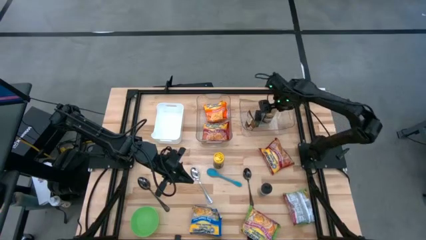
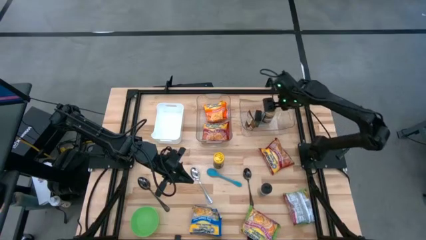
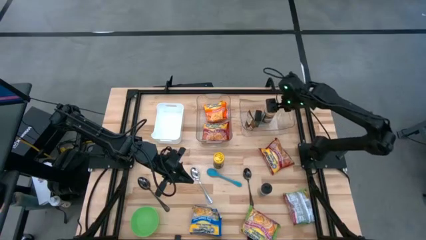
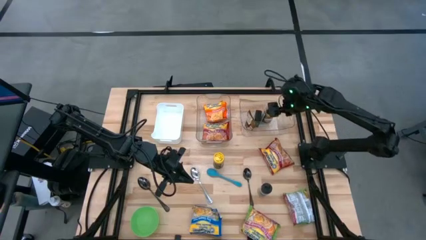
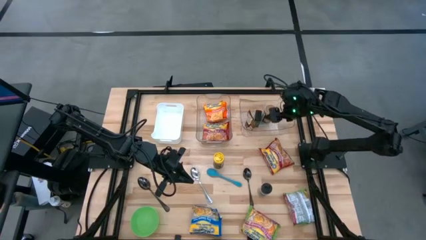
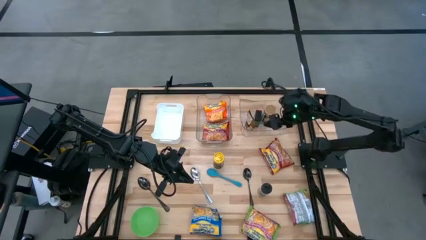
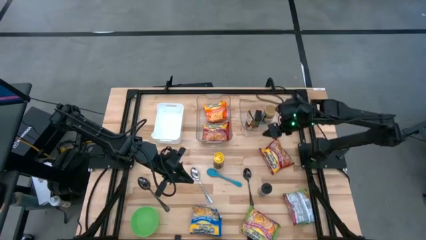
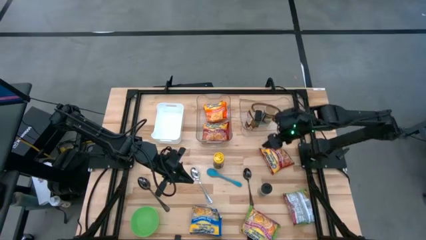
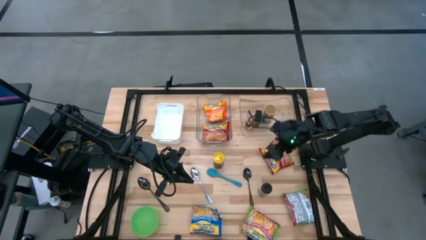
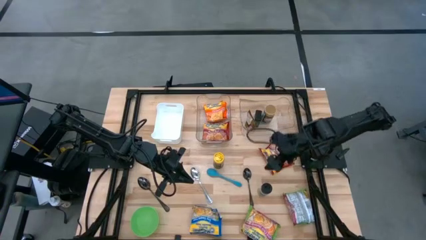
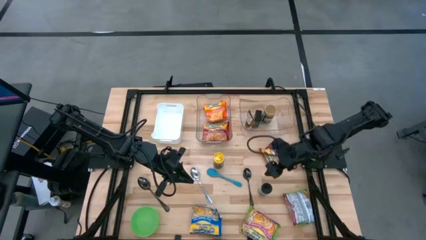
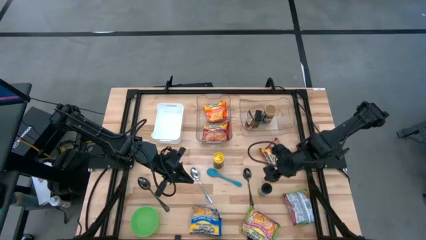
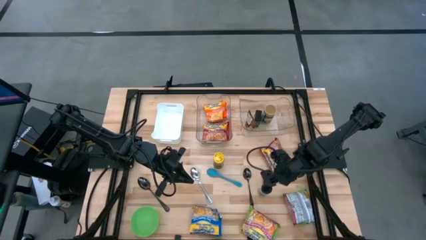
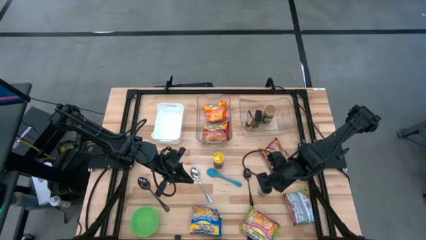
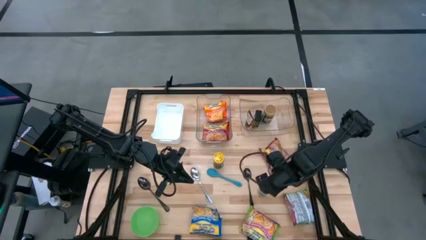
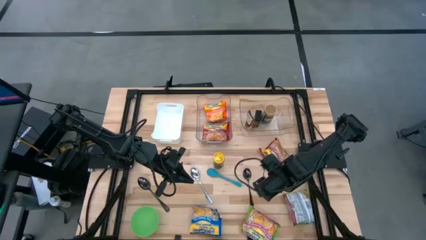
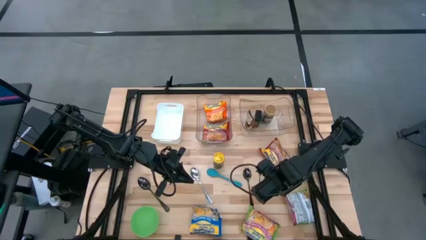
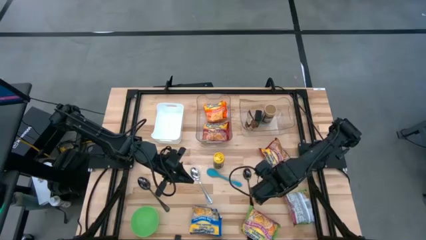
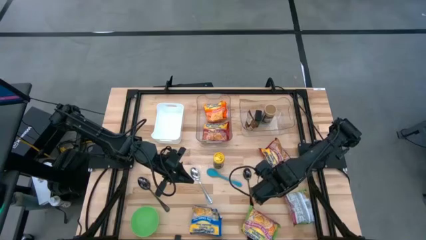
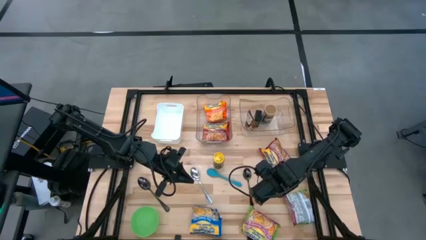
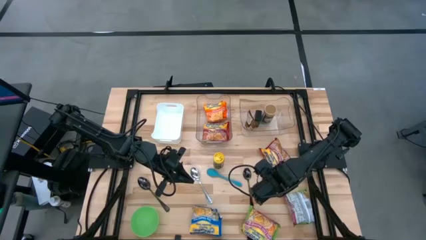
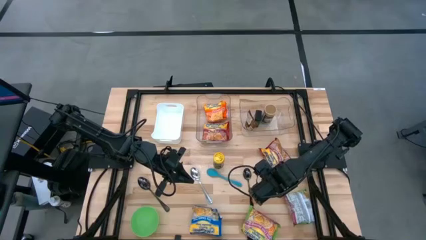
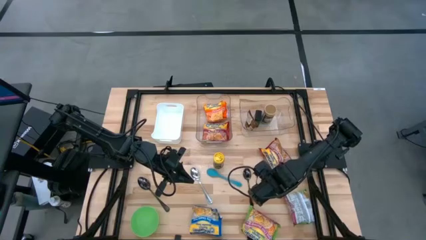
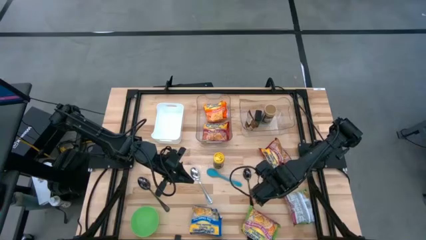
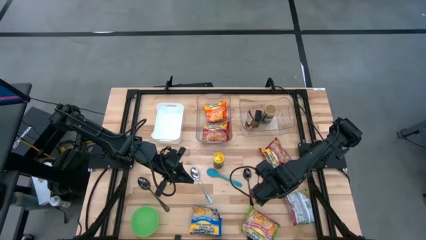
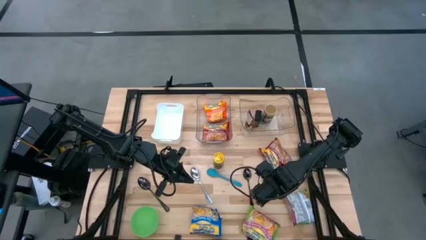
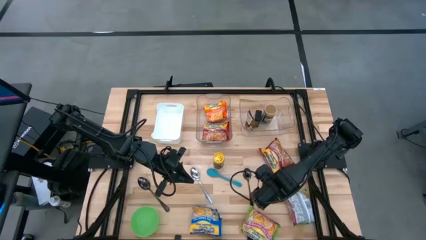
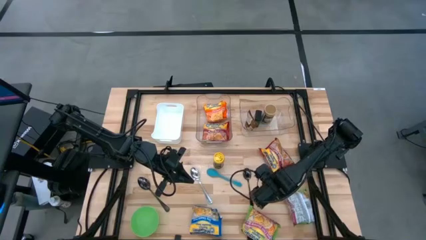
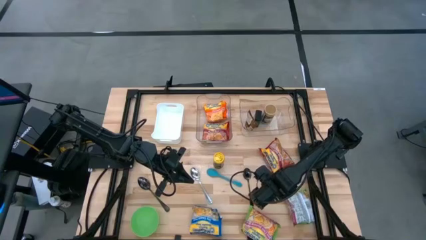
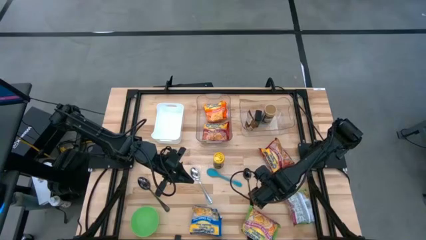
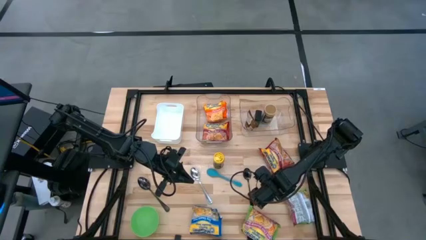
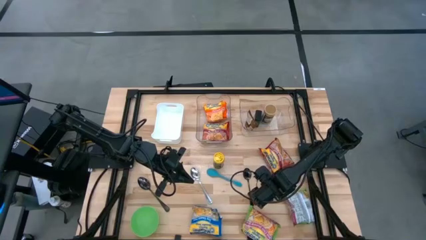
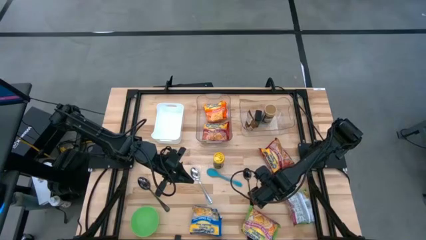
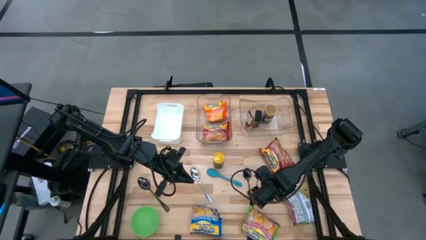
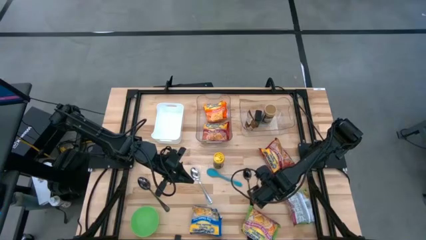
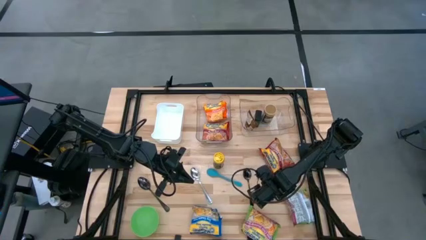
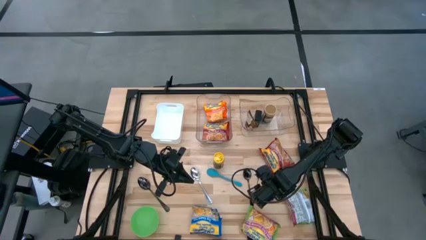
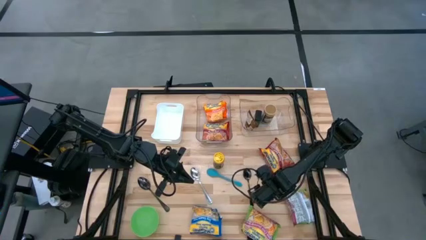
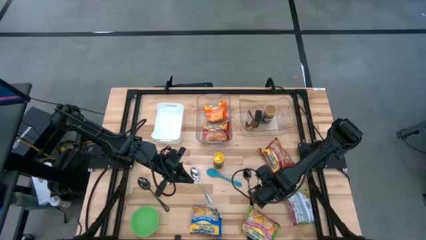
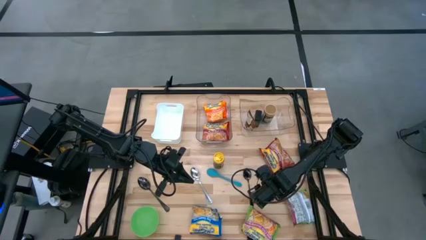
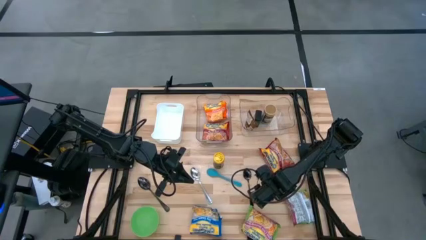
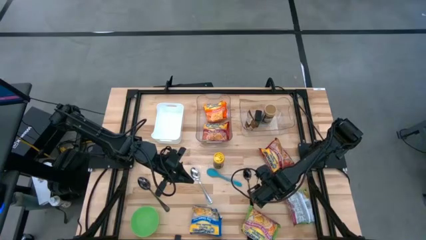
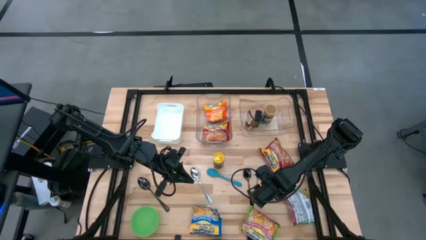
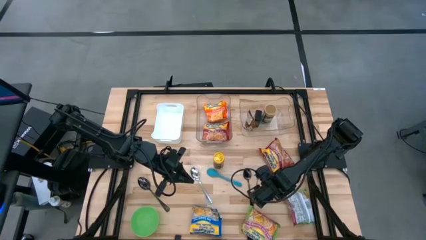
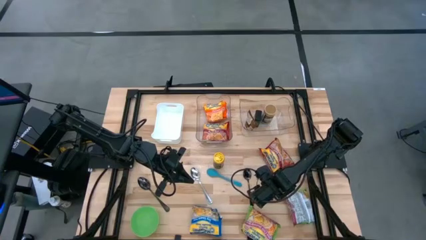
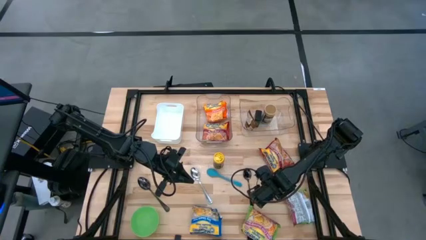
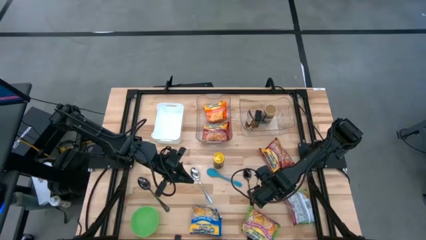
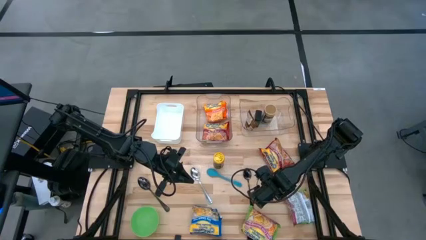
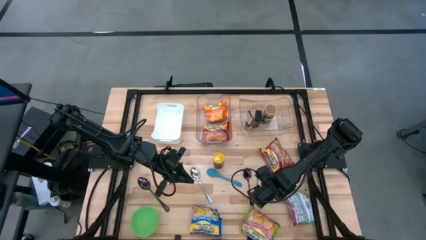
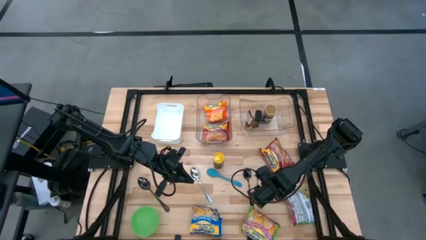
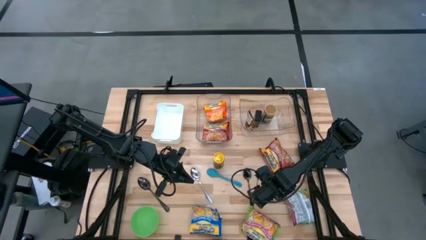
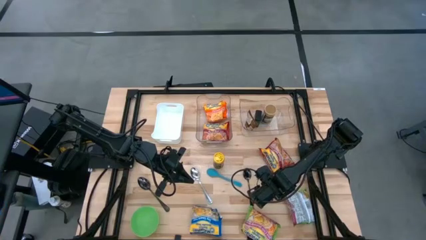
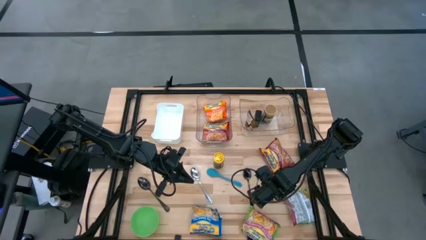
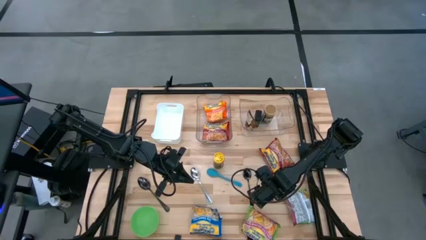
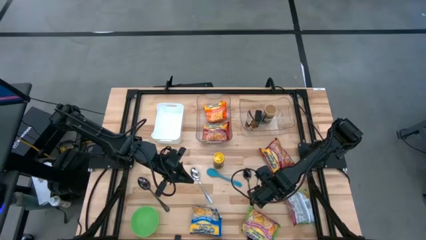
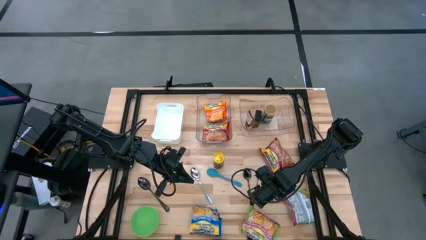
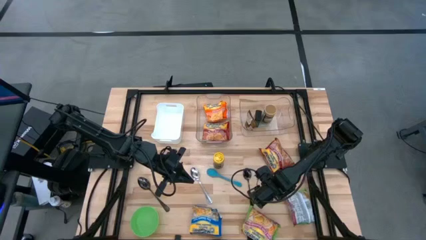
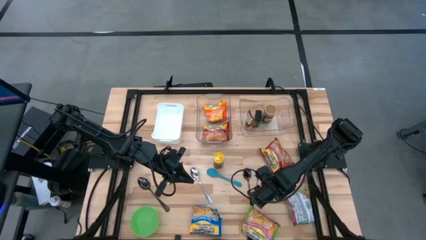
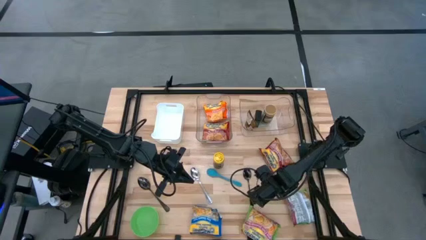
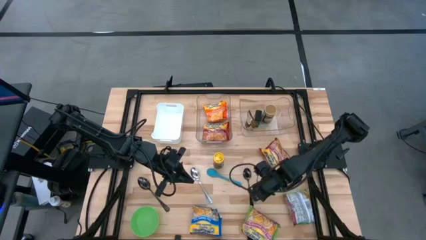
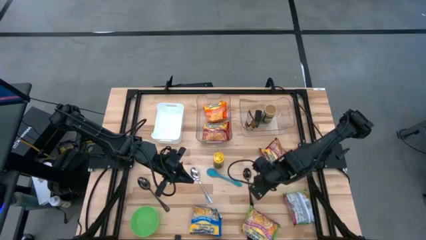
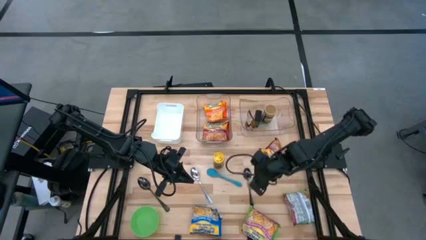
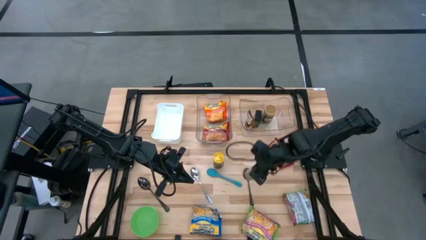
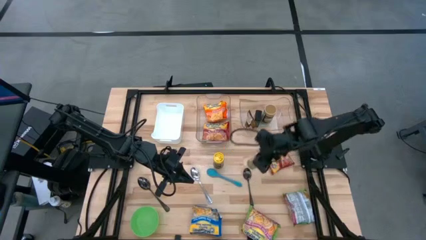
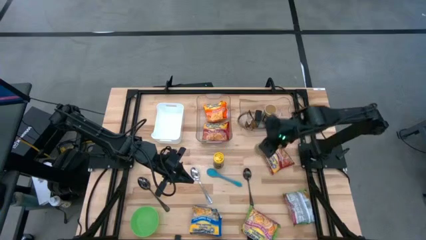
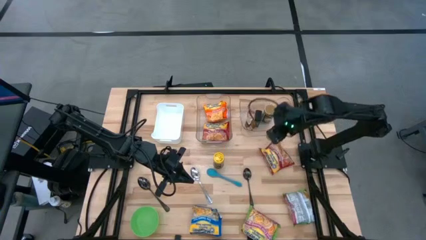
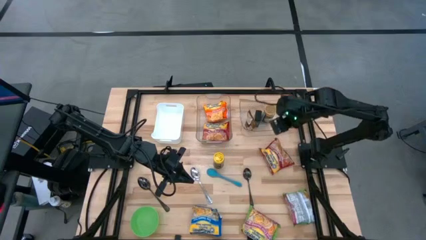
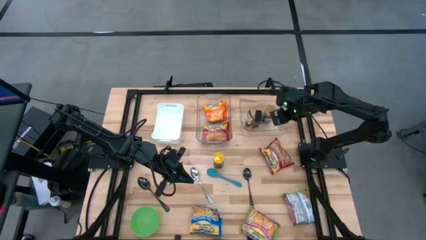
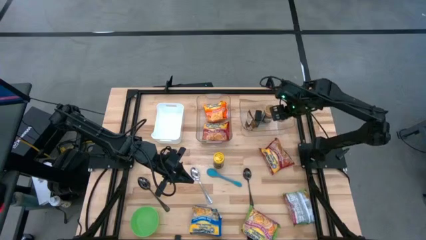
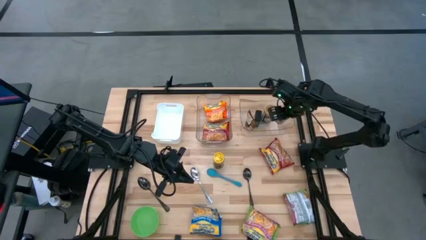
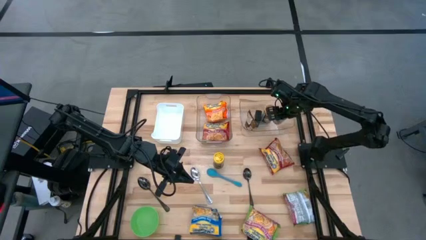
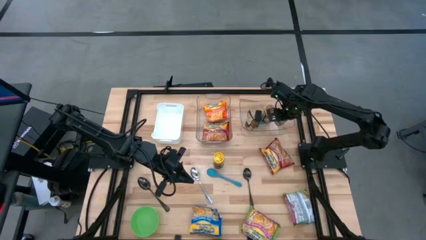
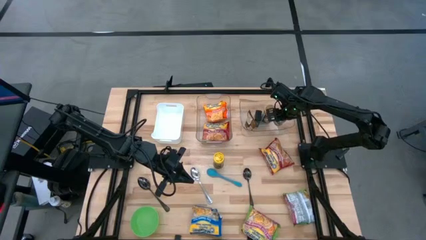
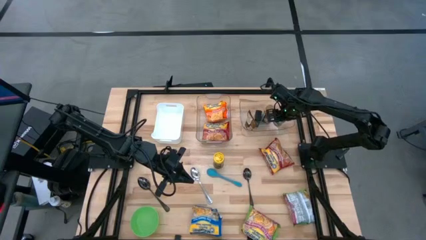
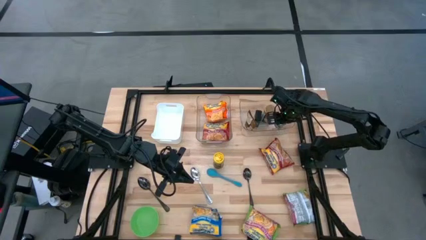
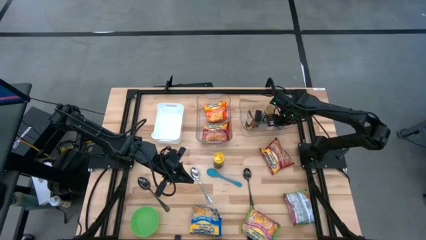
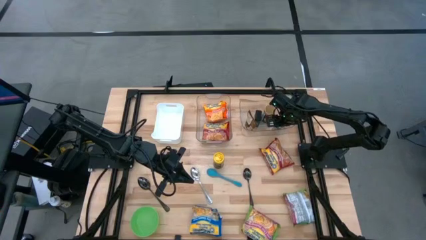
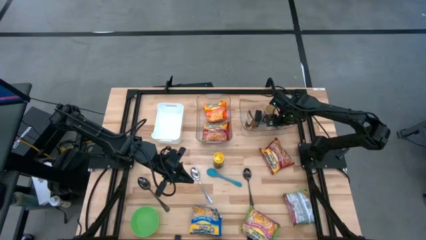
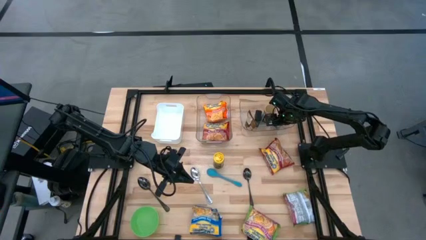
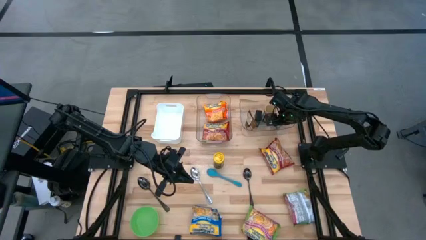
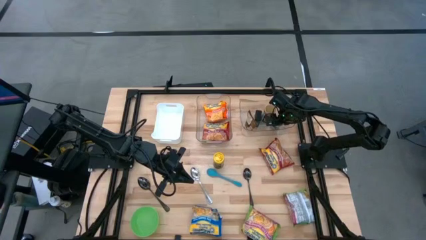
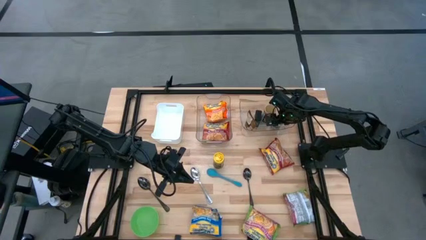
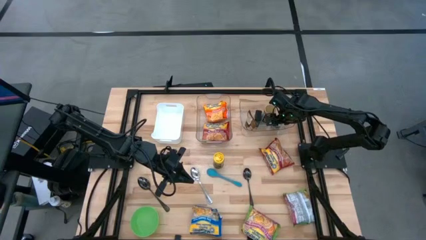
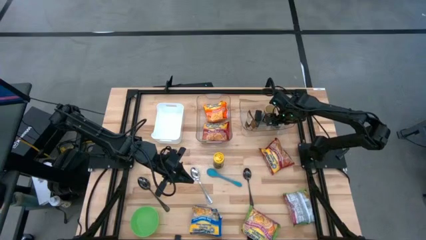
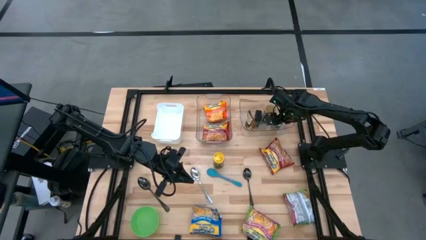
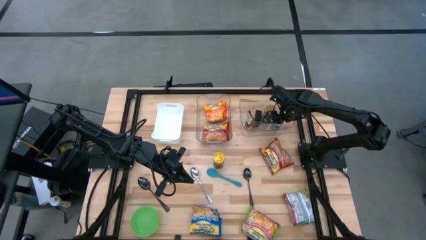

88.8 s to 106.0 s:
Task: Pick & Place Food Item
Put the black spice bottle into the right transparent bin
